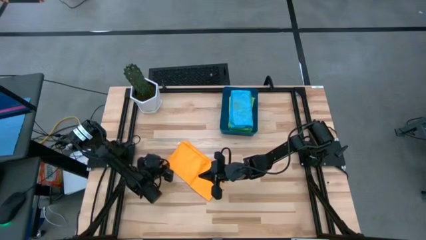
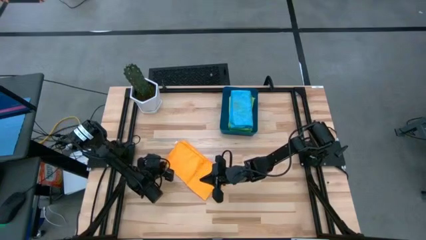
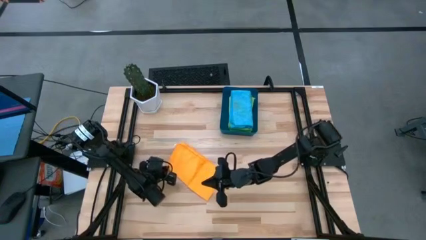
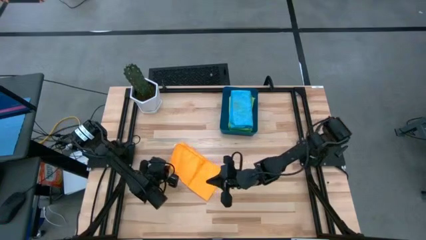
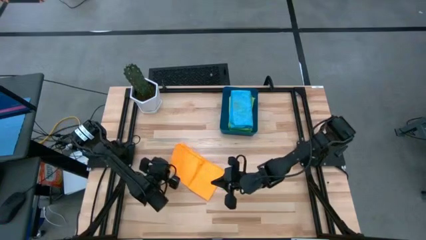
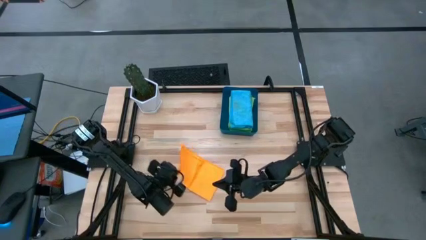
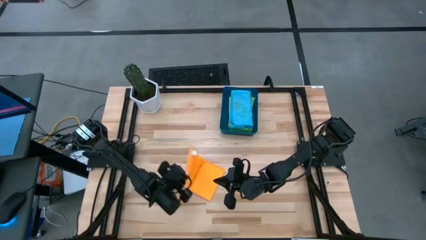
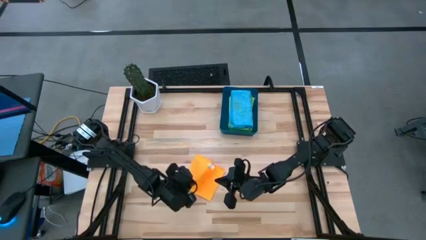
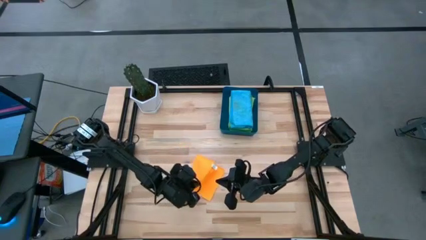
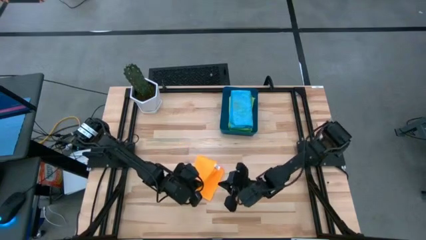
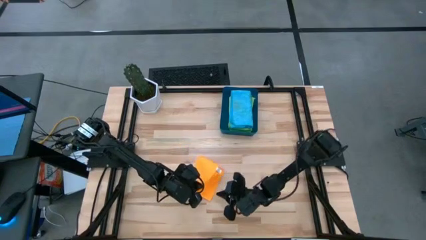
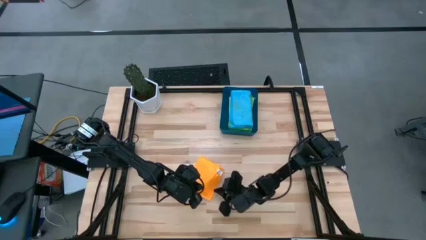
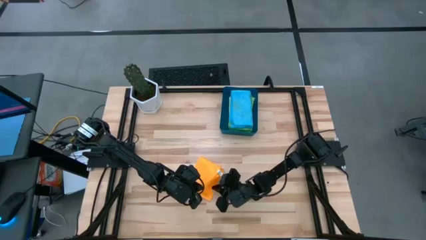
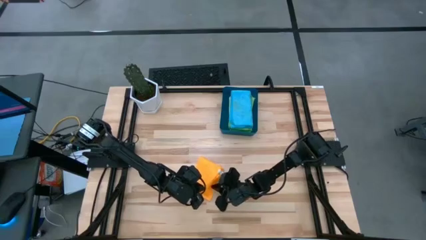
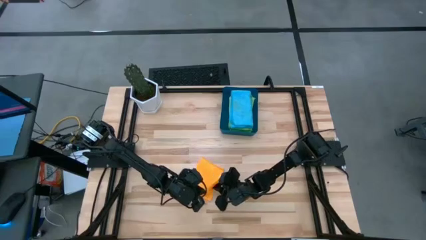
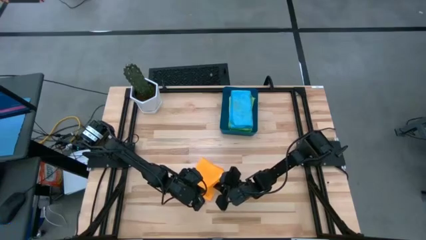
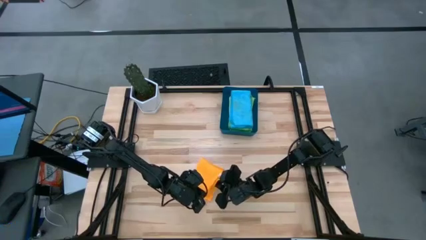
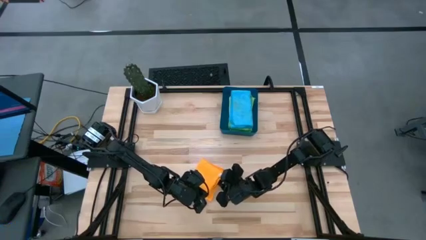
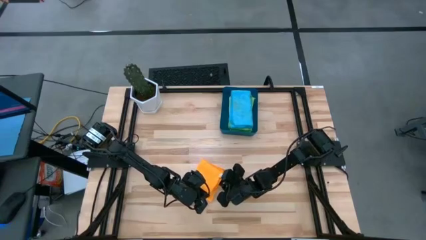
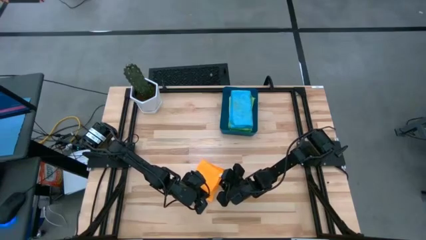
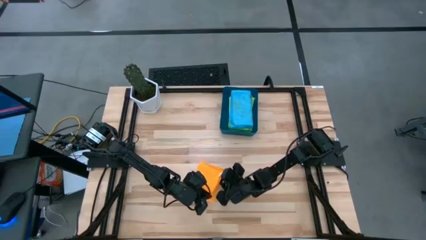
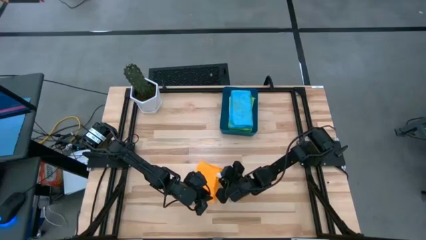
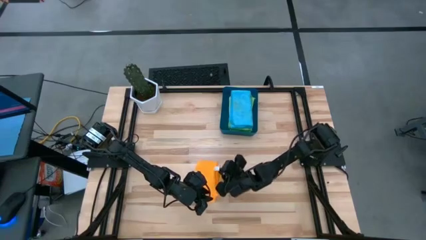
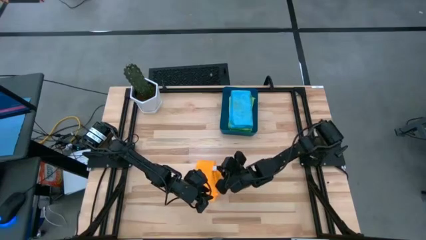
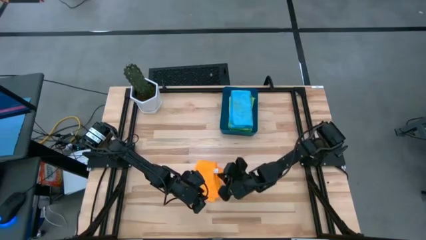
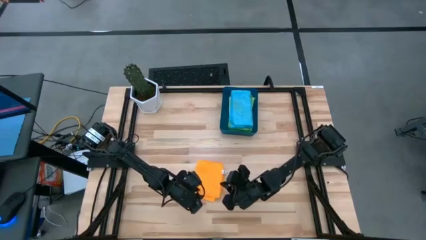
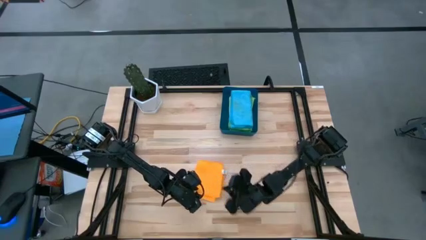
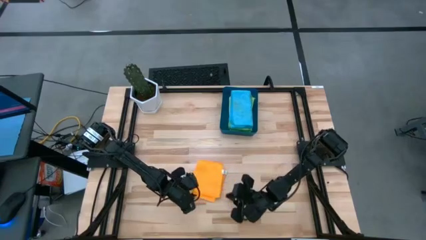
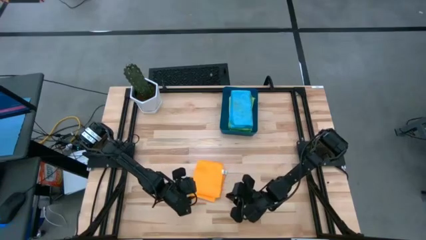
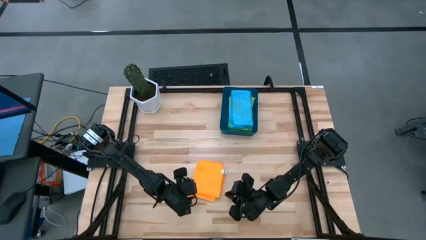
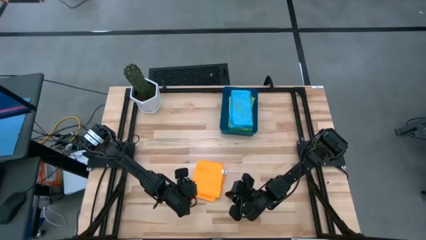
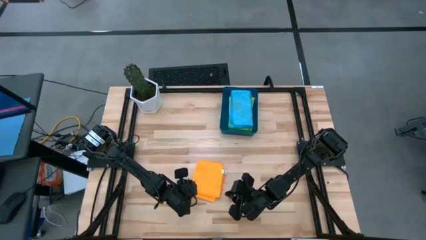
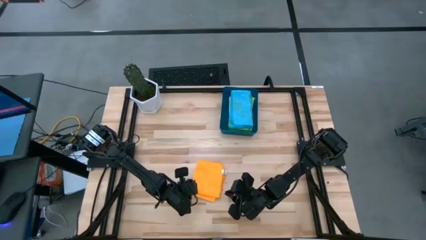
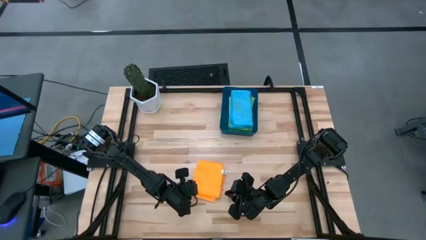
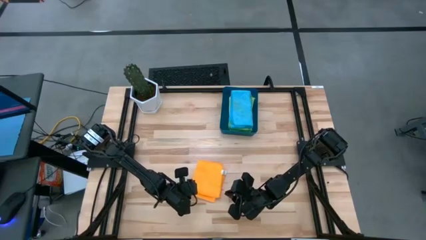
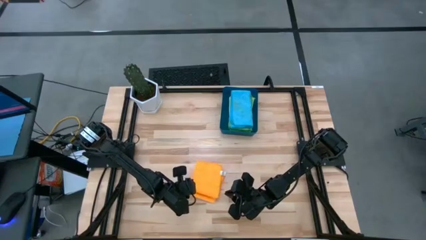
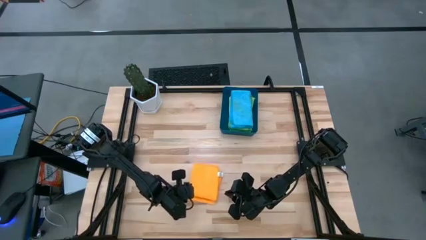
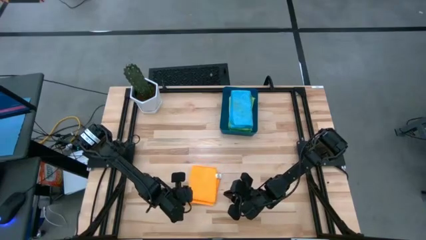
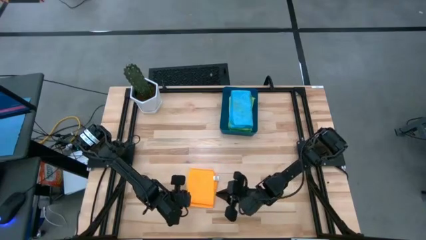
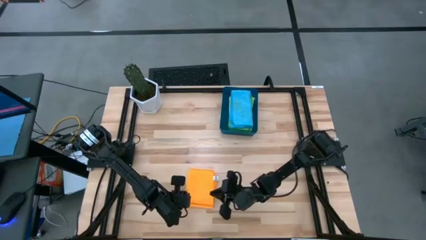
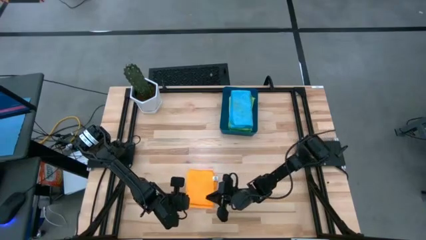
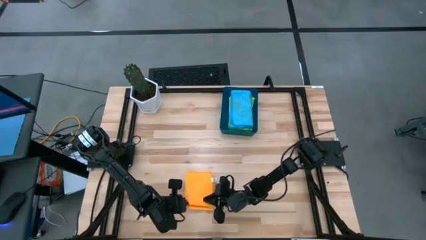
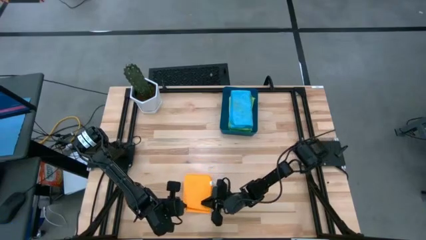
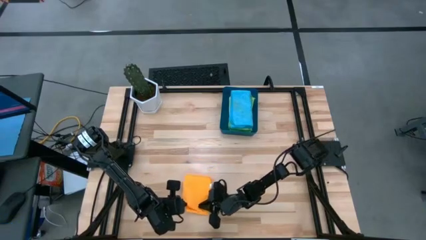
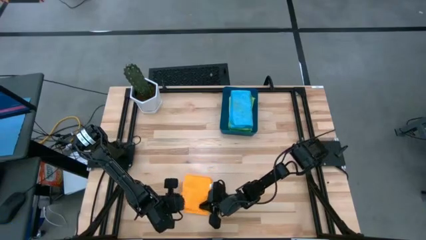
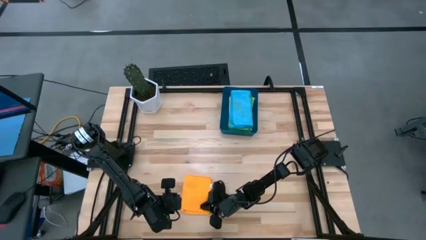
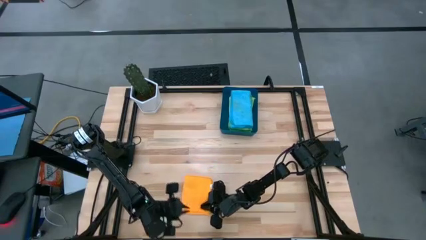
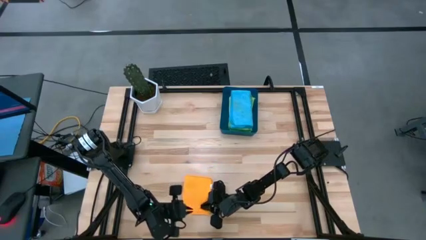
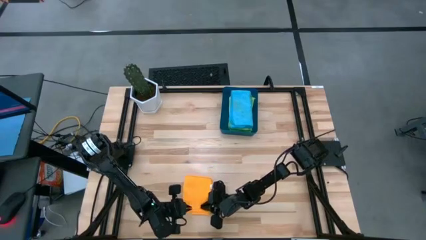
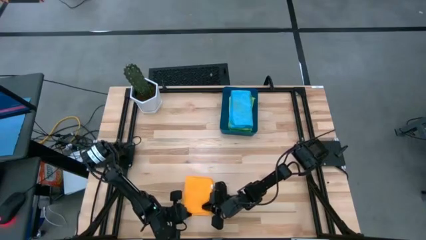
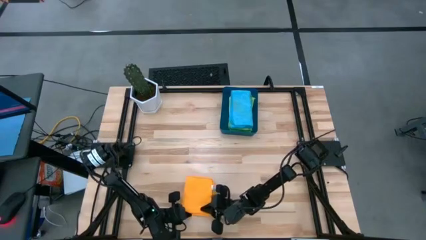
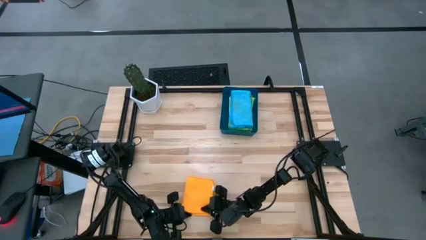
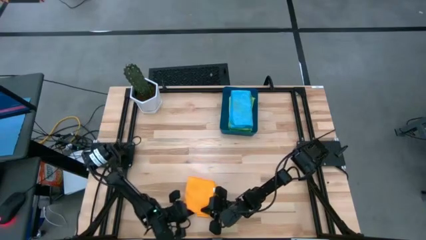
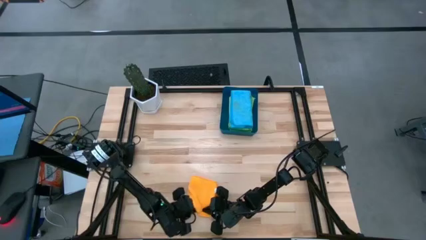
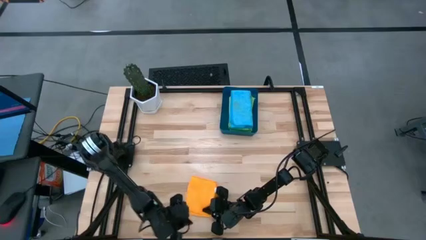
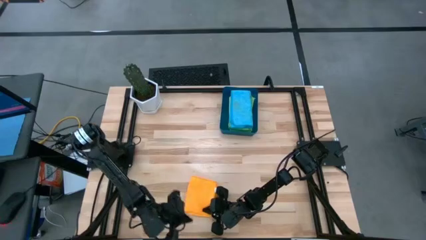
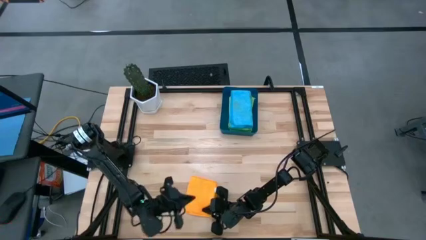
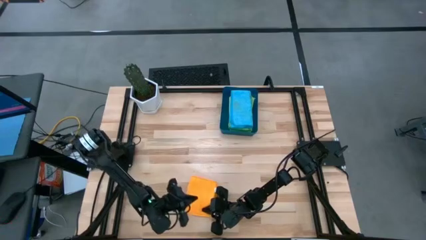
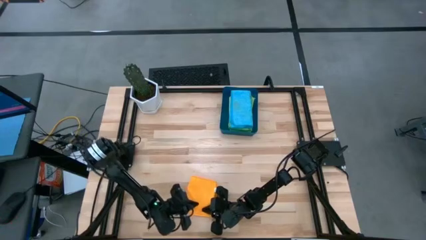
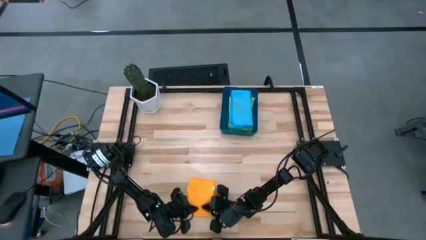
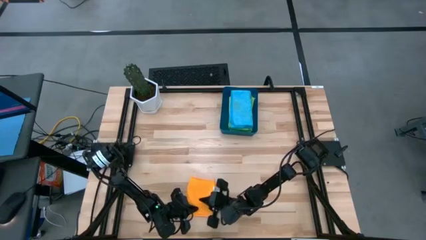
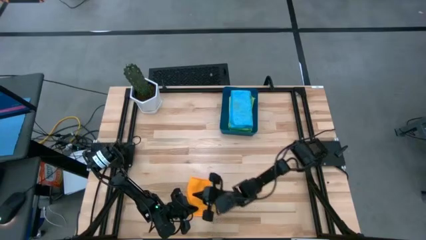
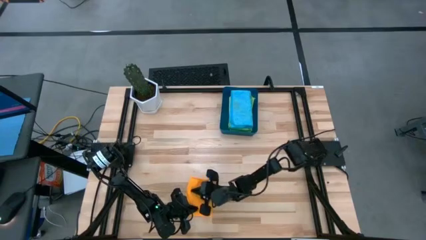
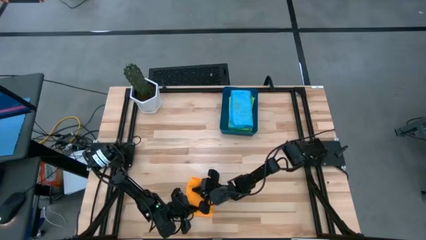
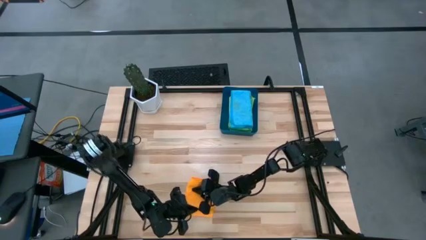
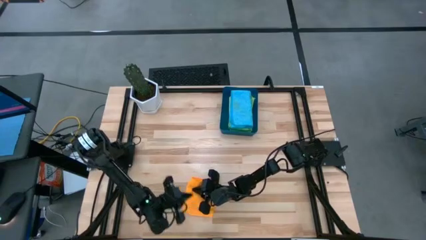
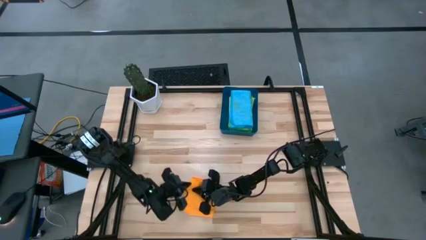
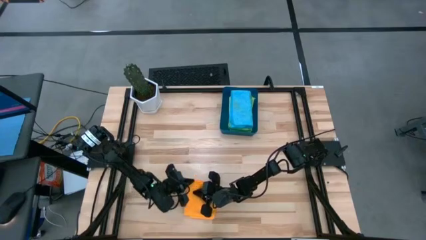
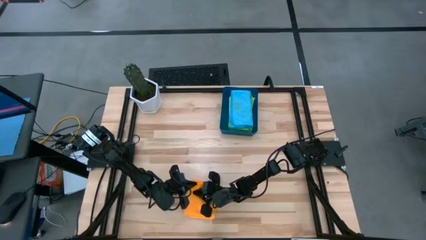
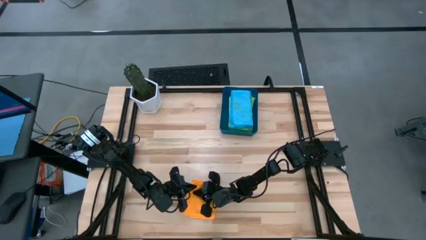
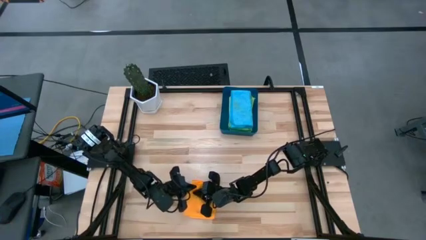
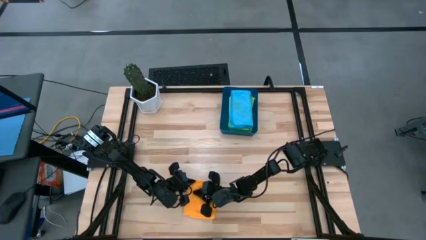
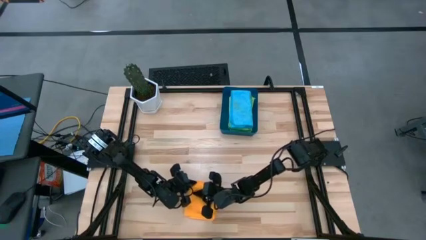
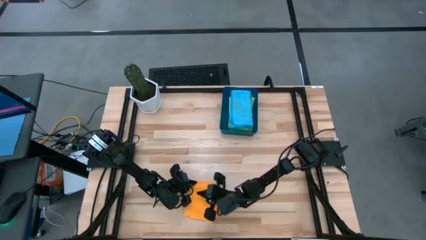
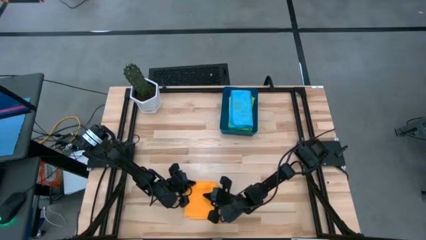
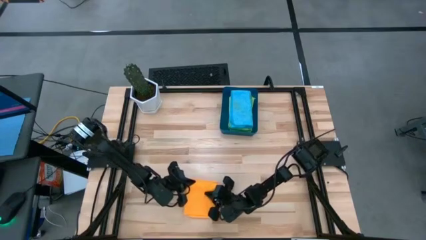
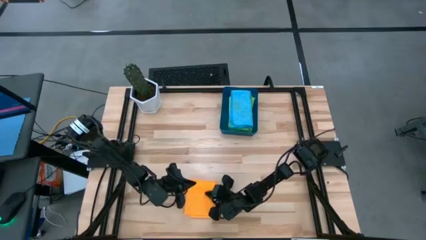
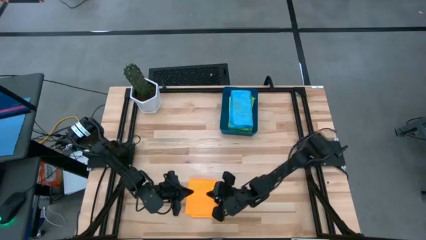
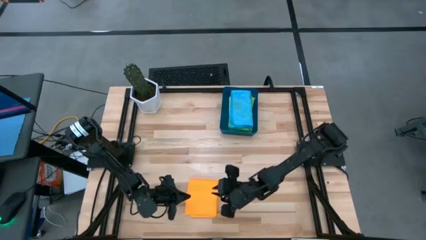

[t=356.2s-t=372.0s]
Task: Fold microfiber towels
Fold the orange towel

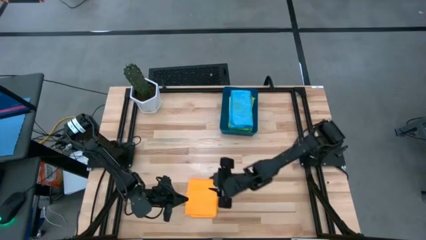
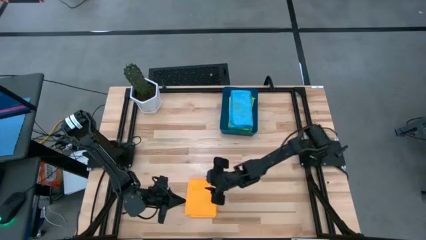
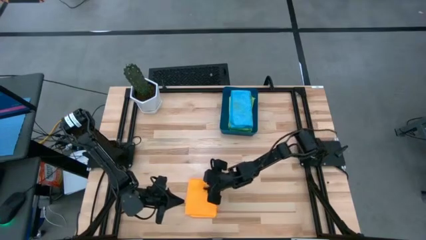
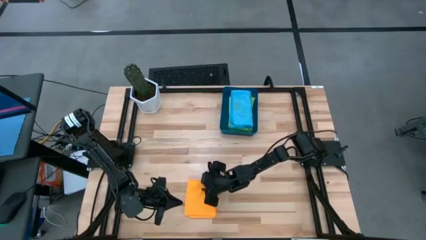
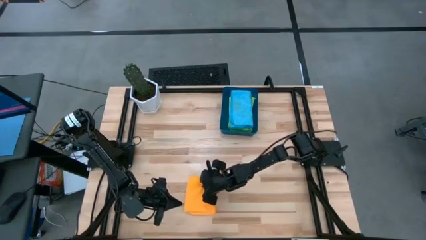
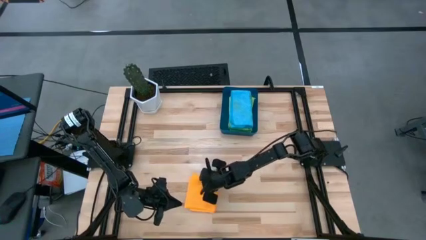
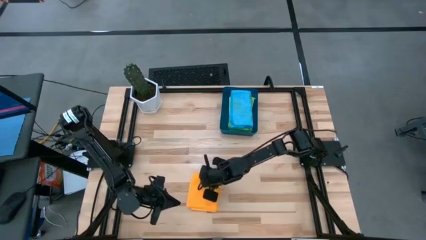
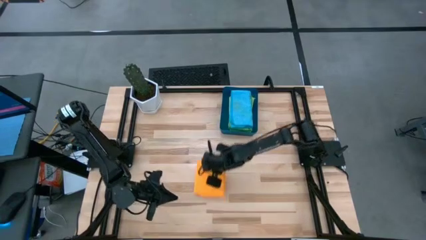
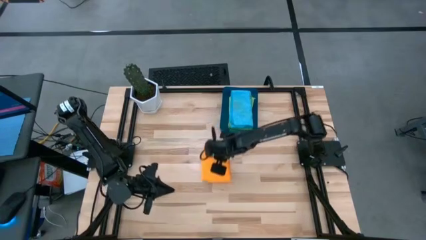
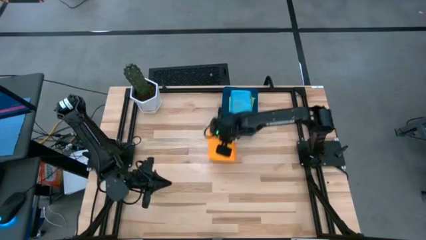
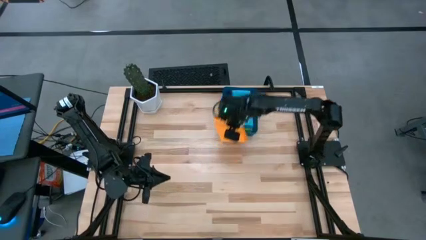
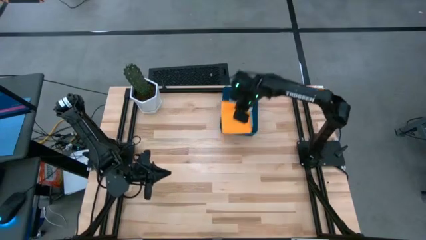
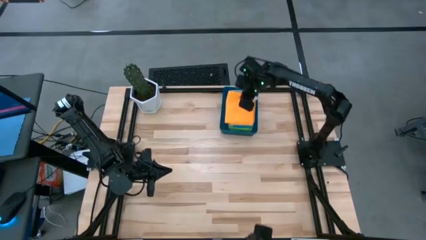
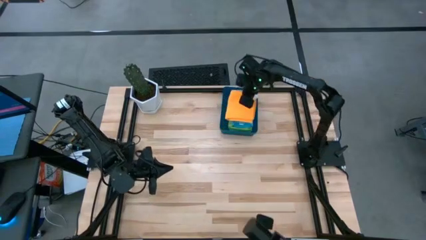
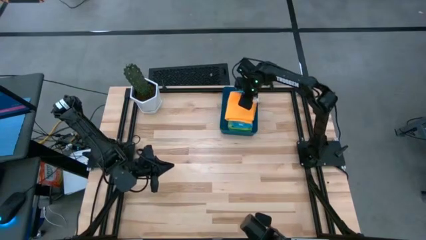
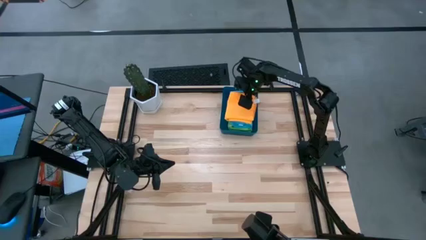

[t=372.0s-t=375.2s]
Put the orange towel into the blue bin
